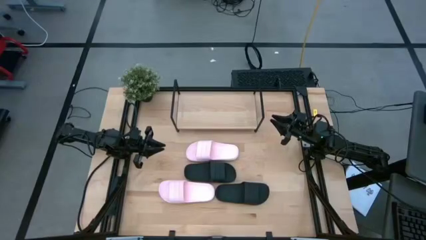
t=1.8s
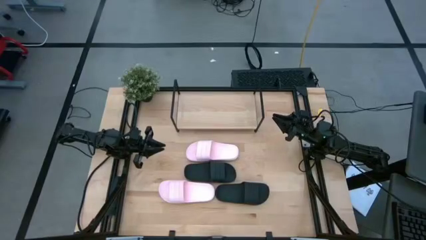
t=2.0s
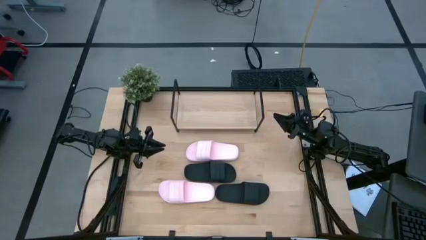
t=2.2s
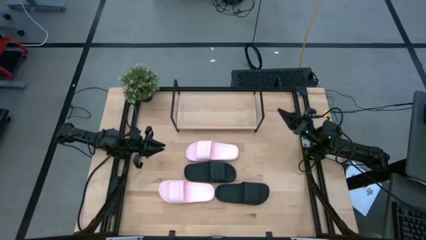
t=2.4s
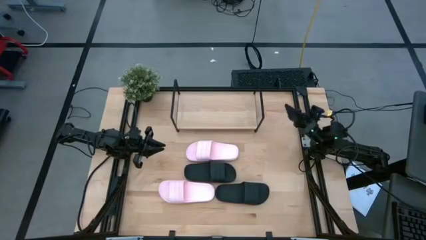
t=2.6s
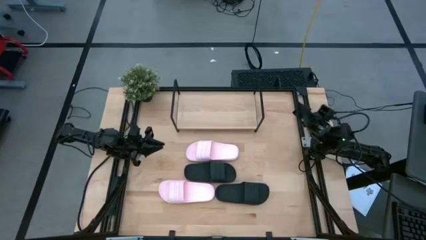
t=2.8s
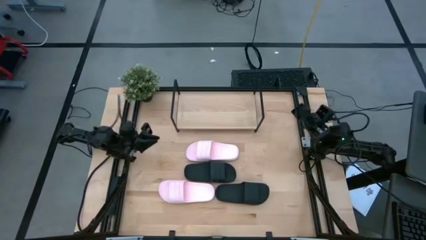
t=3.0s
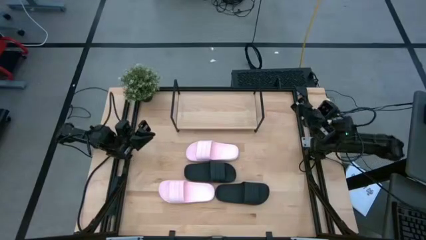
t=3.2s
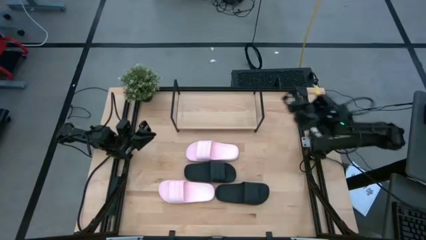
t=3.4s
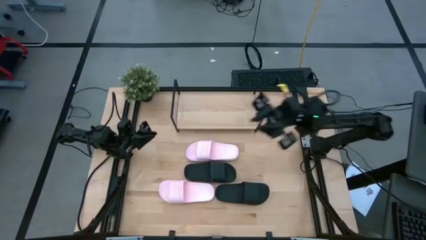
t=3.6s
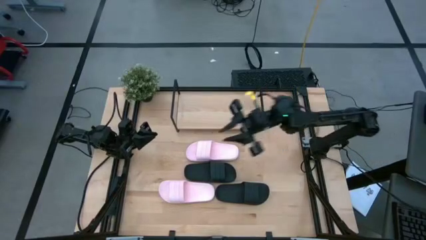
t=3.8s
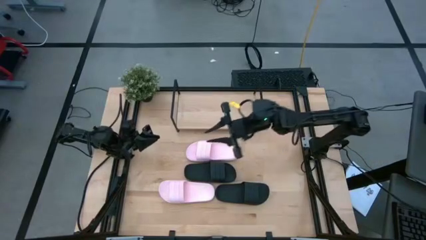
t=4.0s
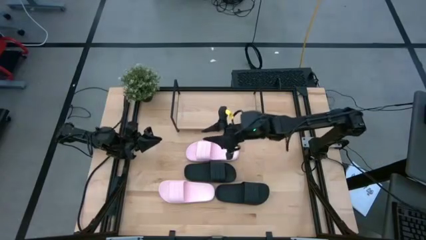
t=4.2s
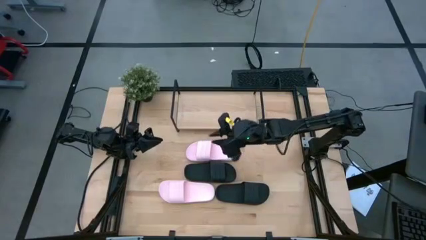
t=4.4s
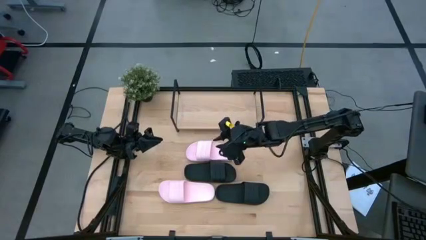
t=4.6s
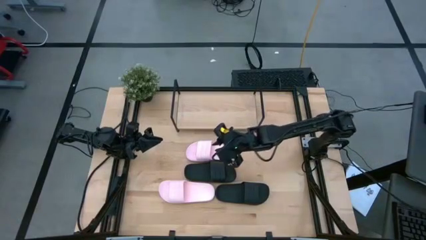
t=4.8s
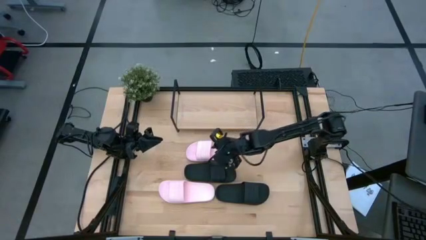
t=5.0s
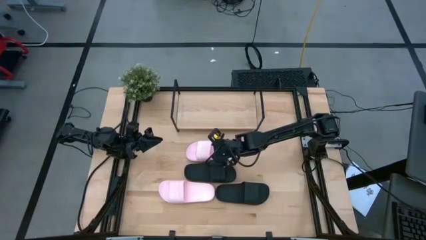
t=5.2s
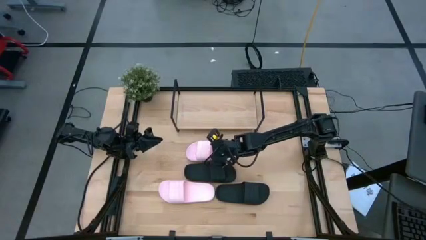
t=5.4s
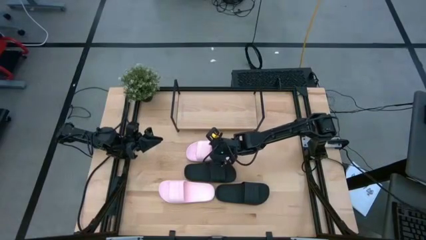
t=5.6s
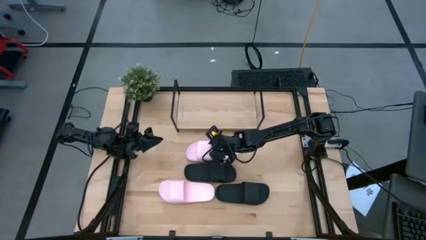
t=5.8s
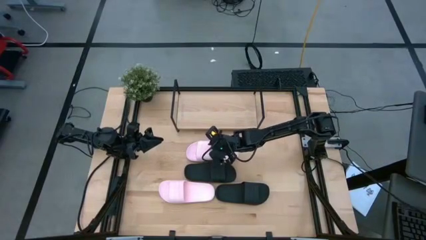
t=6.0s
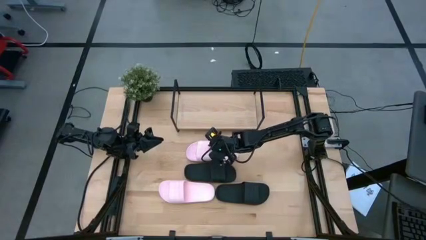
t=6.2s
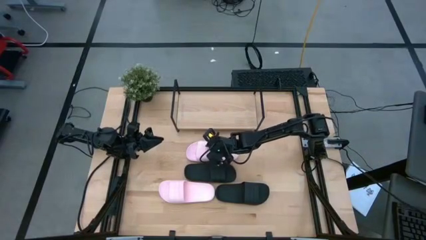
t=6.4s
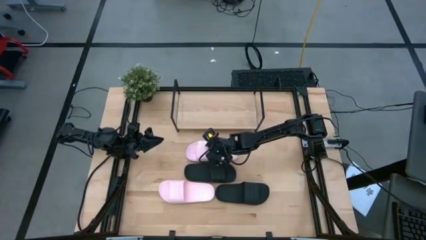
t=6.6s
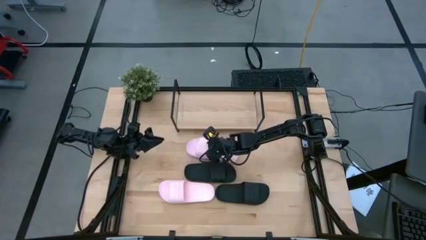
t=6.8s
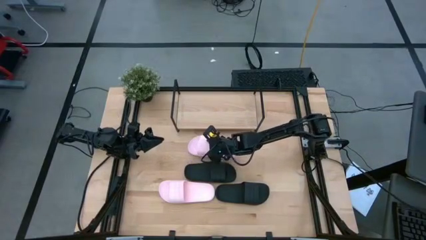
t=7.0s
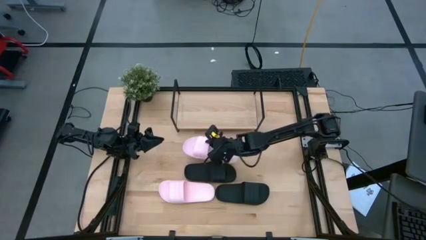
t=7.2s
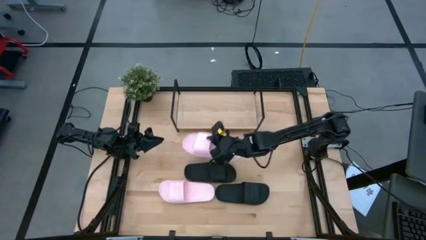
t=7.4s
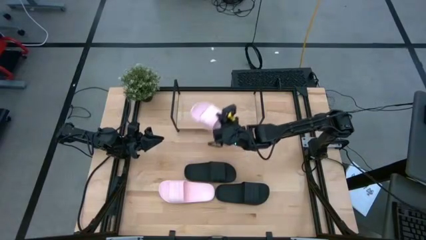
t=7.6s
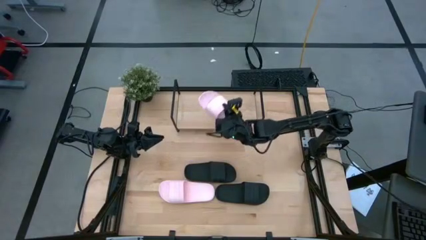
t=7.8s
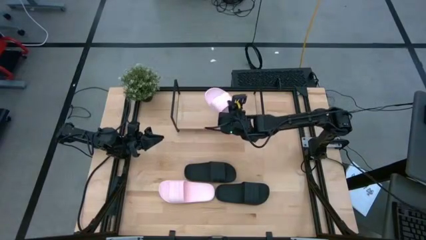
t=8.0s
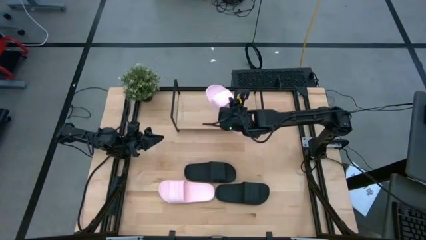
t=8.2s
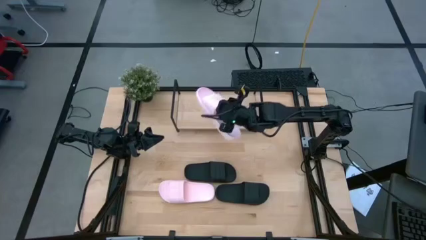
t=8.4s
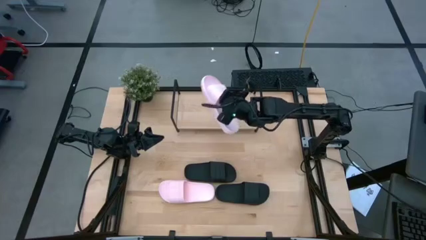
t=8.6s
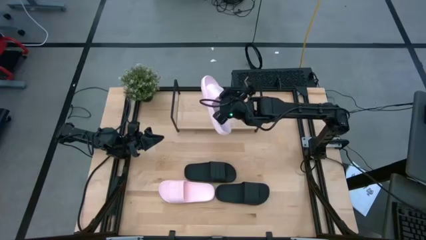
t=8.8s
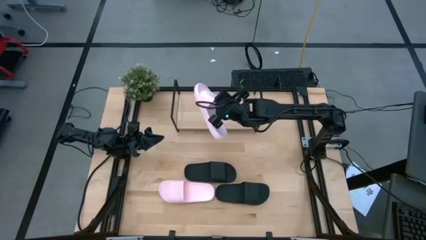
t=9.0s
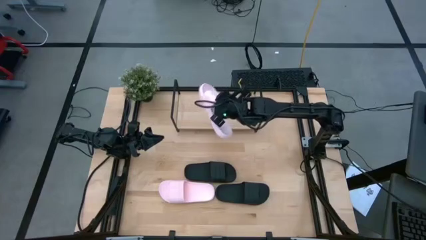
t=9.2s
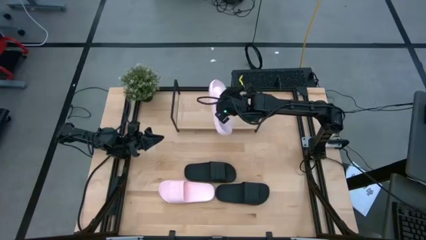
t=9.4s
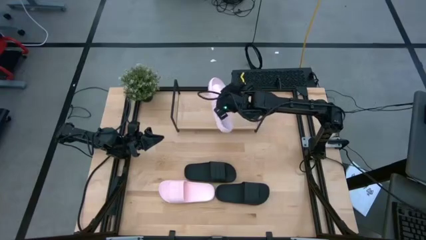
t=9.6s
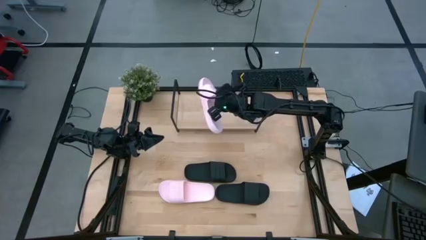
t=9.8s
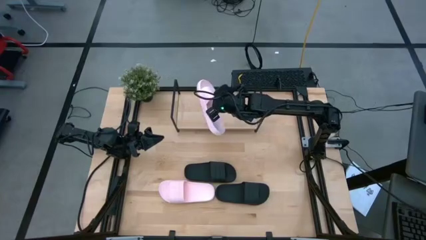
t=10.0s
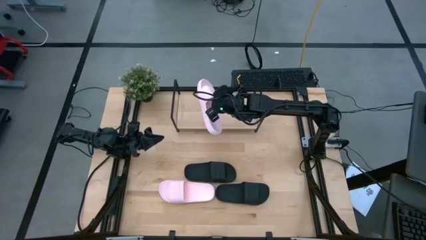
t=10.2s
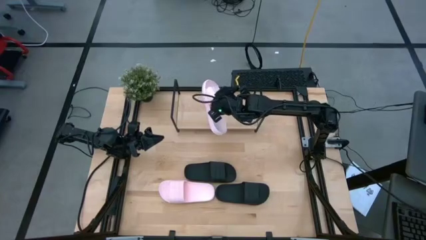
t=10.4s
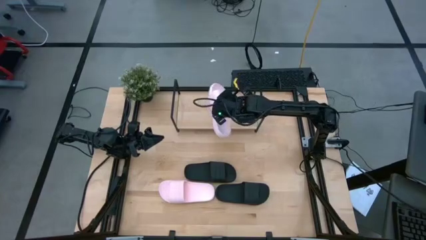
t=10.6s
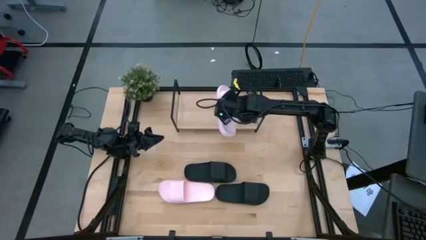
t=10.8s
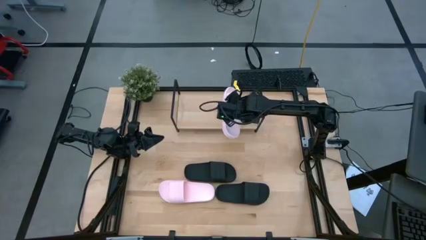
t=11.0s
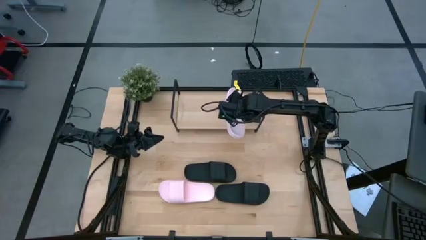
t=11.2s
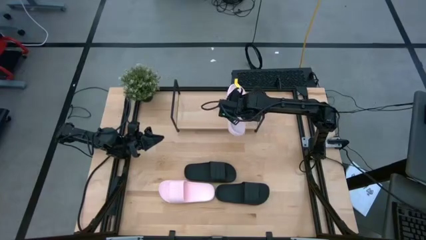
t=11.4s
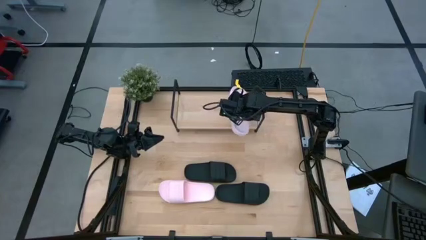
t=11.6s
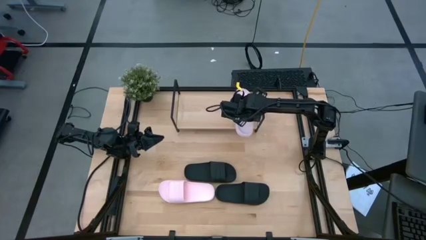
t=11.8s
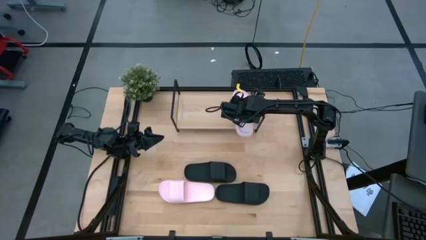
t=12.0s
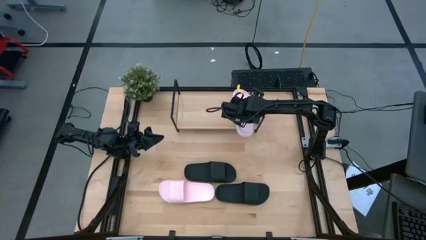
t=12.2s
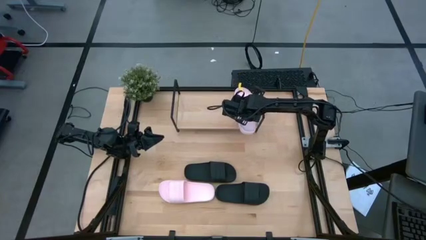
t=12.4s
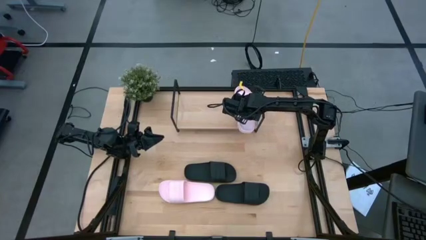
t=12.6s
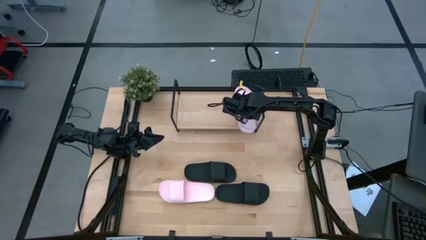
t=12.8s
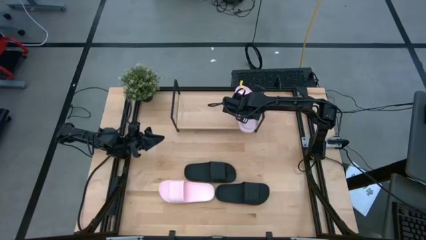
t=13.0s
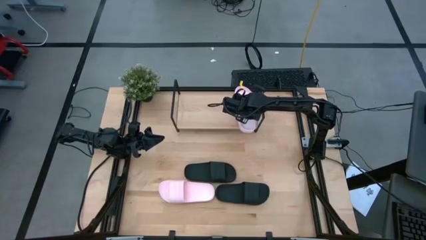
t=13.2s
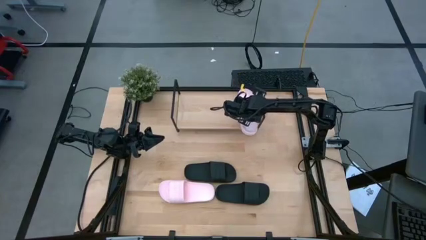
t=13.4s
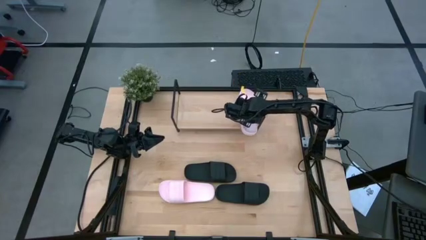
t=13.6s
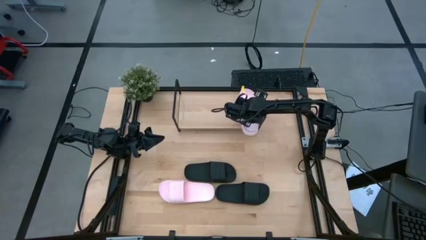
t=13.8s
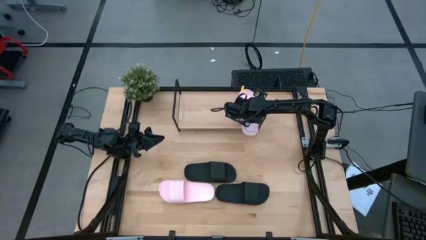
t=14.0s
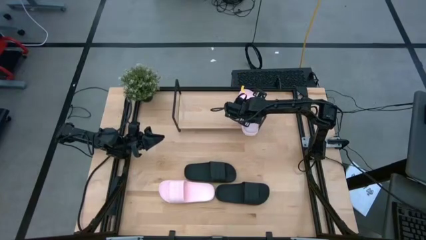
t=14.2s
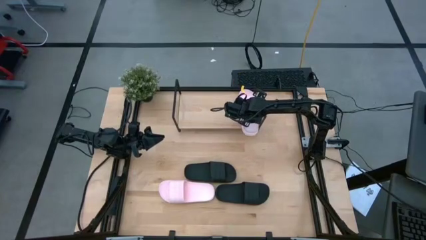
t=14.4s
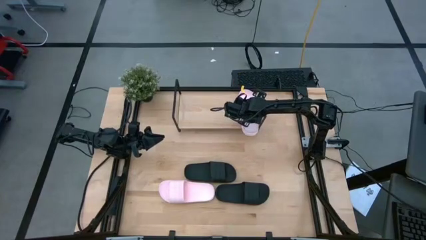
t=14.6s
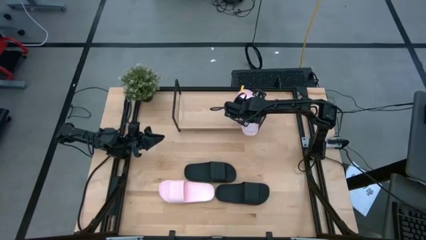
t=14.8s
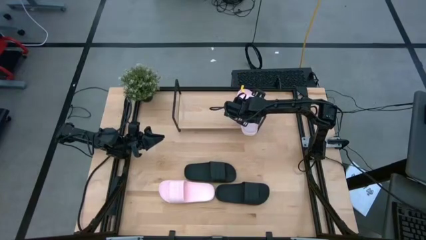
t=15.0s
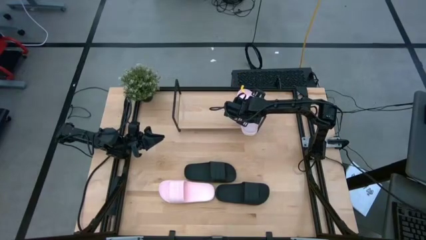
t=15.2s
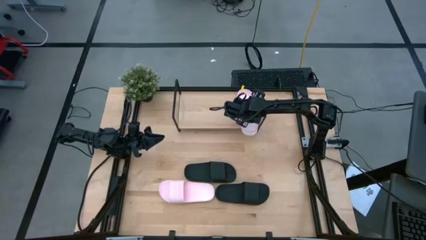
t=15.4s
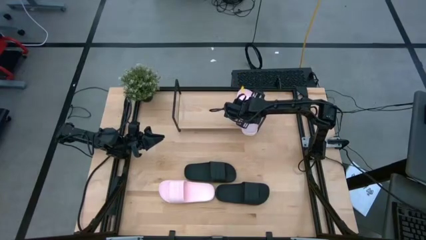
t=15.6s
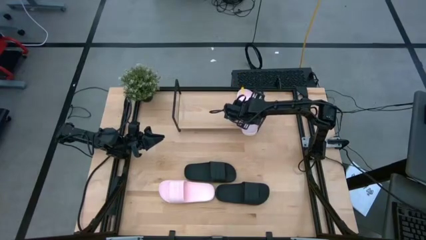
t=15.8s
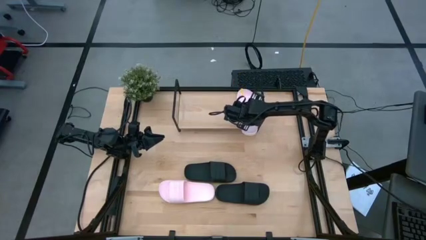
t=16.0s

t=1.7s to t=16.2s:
Task: Pick and place slides into the shelf
Put the top pink slide on the shelf
